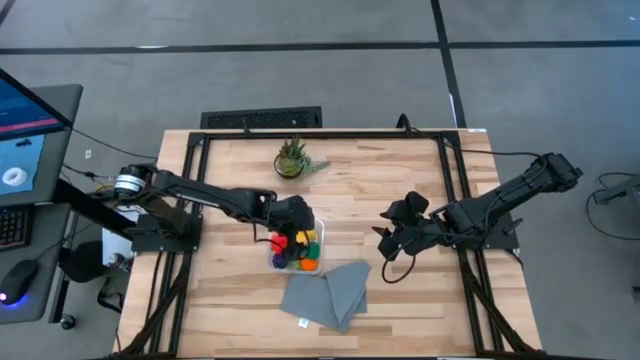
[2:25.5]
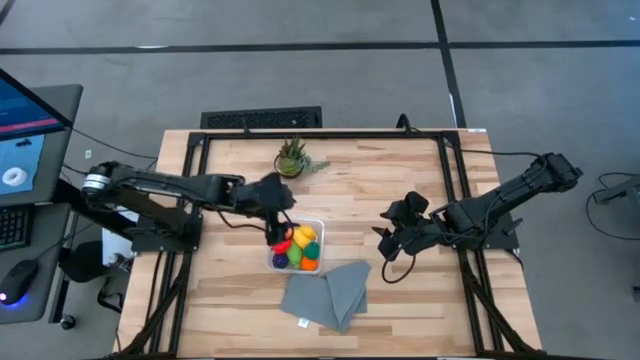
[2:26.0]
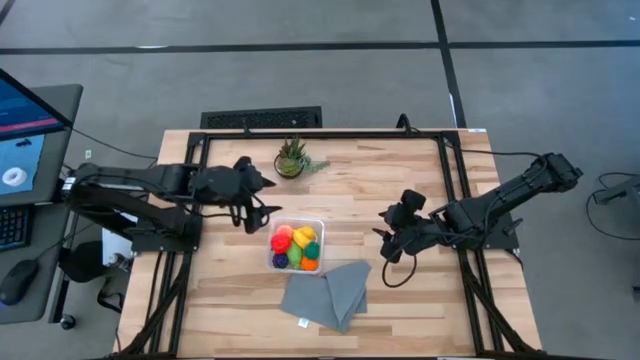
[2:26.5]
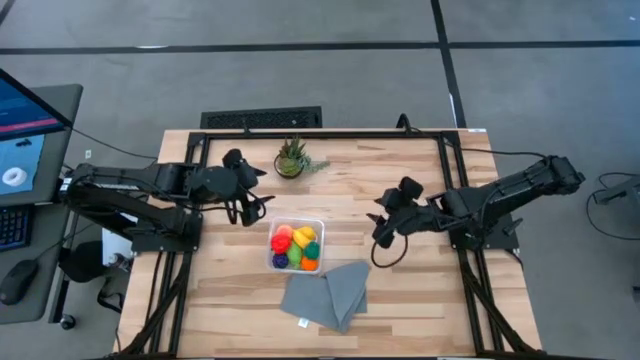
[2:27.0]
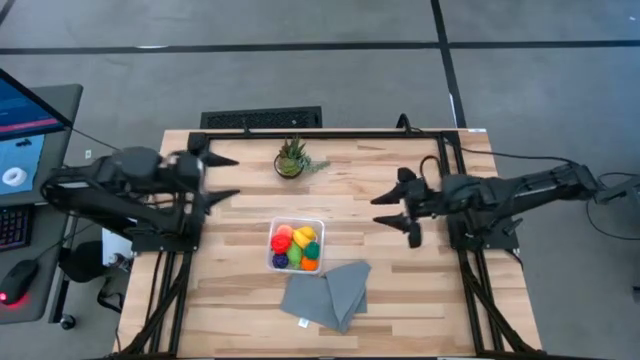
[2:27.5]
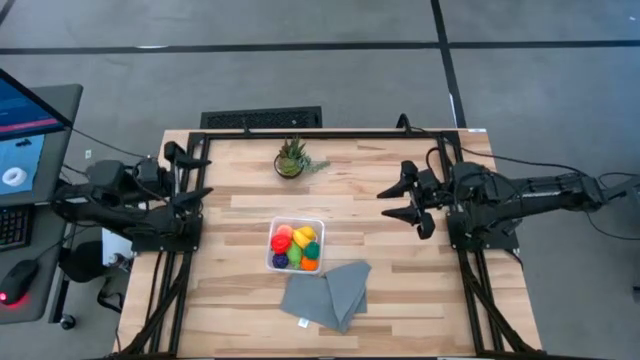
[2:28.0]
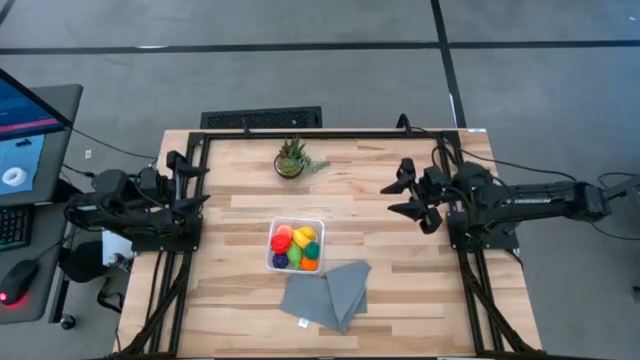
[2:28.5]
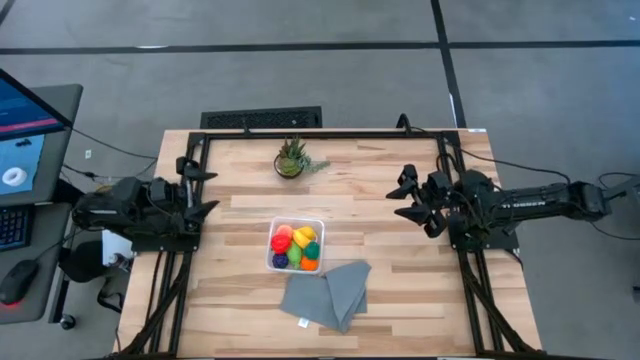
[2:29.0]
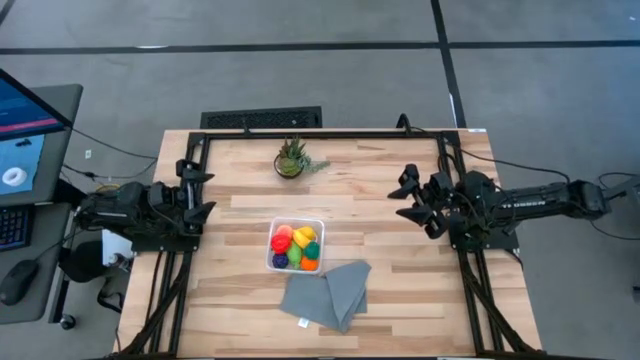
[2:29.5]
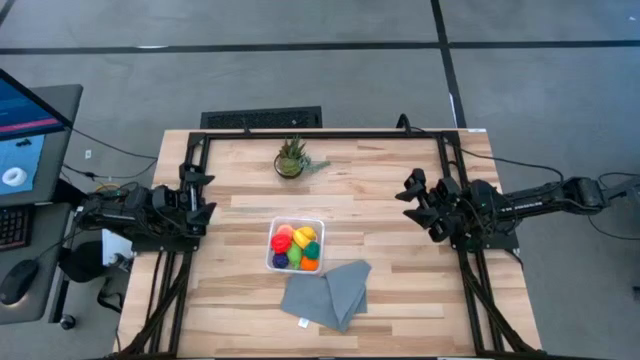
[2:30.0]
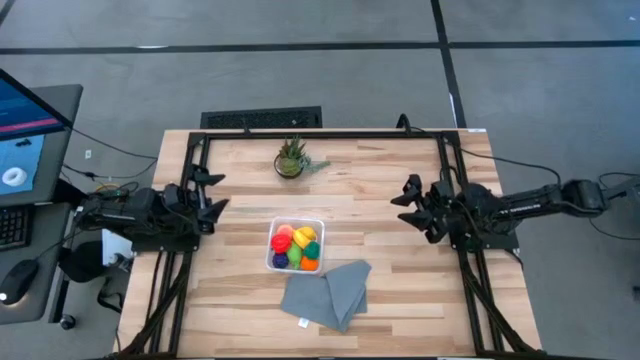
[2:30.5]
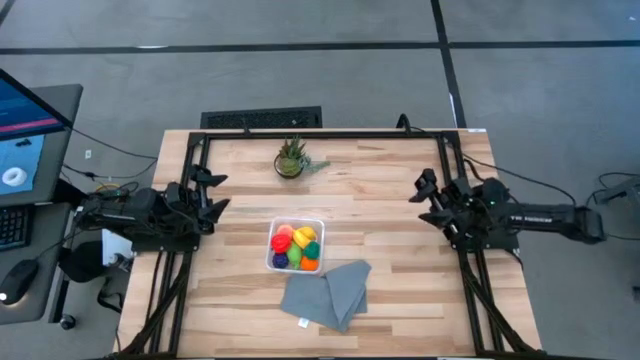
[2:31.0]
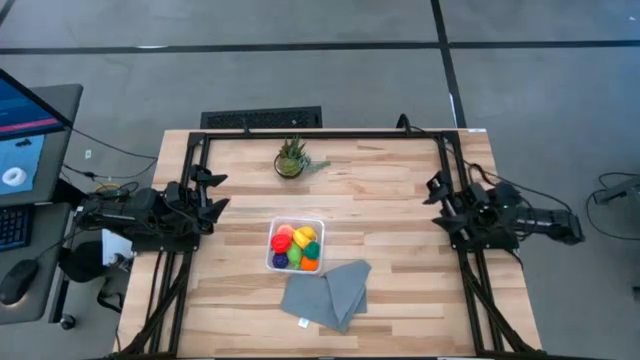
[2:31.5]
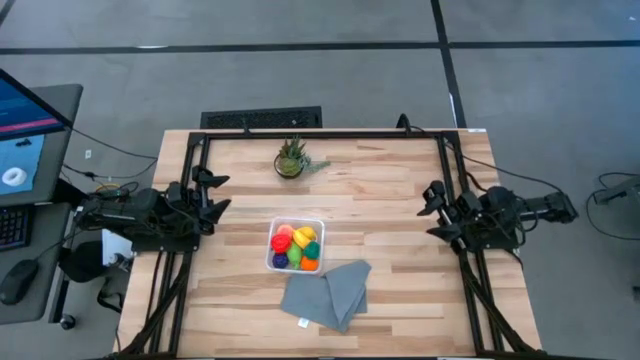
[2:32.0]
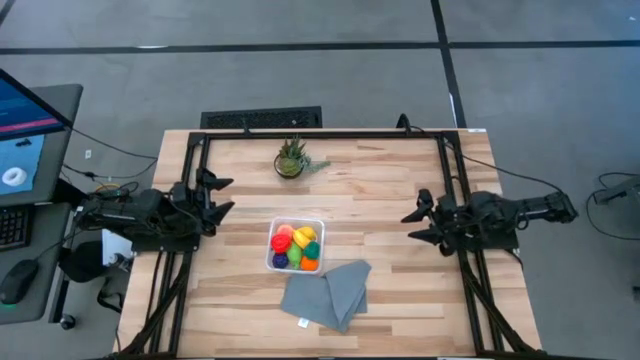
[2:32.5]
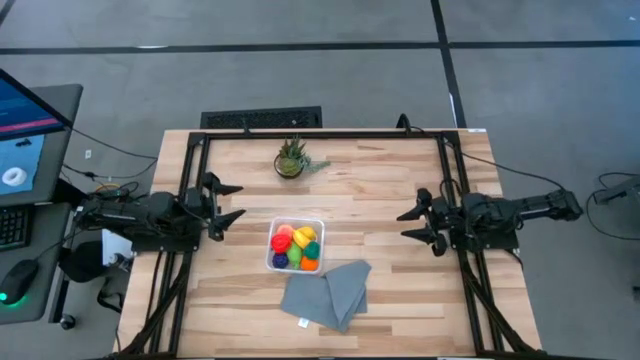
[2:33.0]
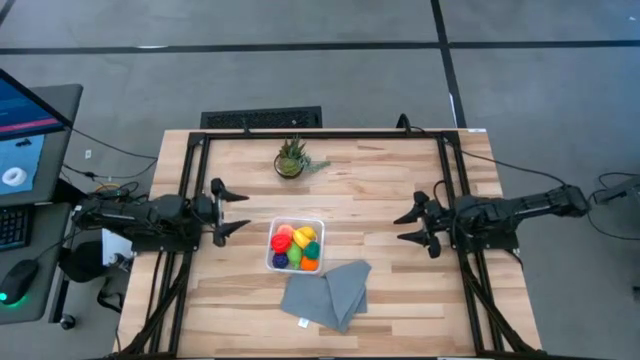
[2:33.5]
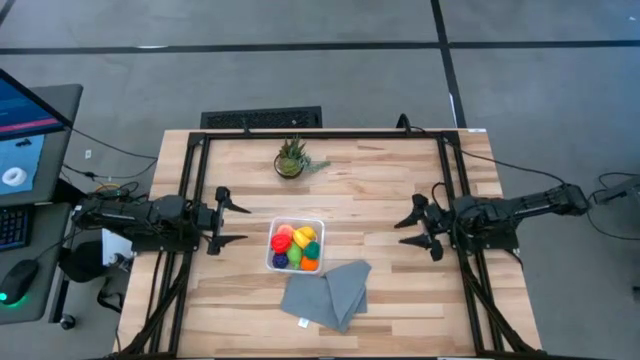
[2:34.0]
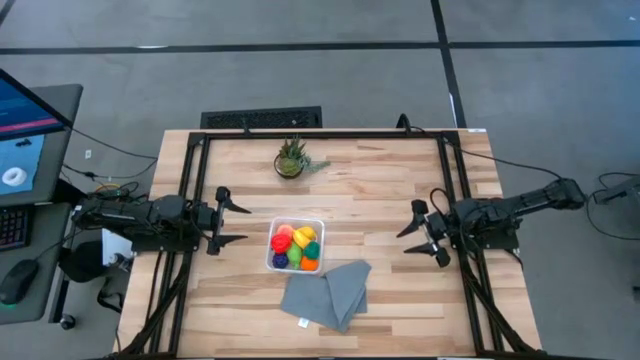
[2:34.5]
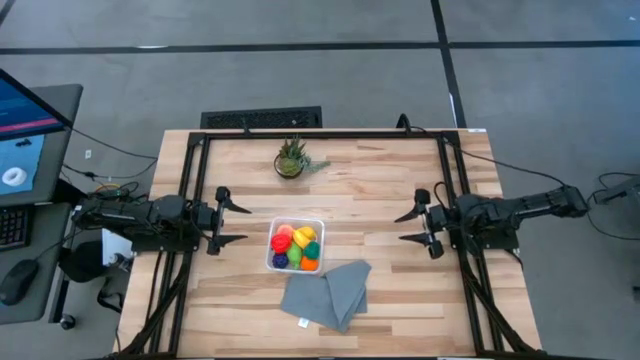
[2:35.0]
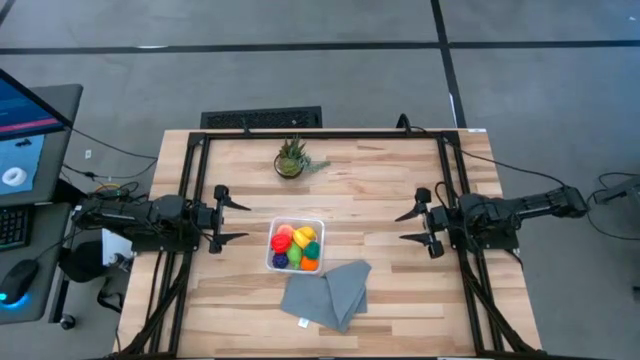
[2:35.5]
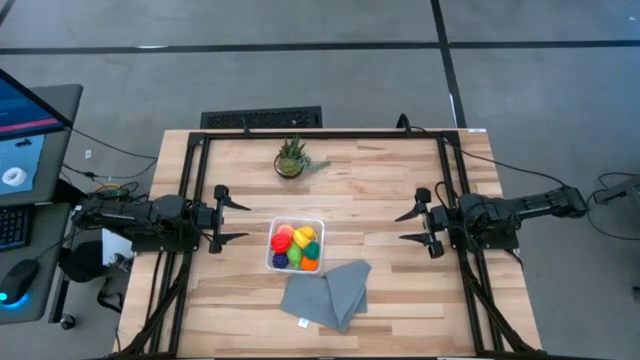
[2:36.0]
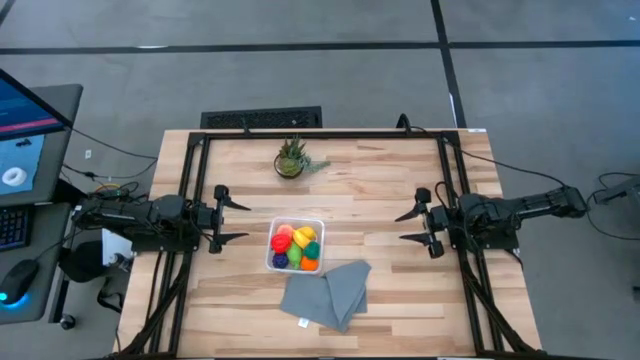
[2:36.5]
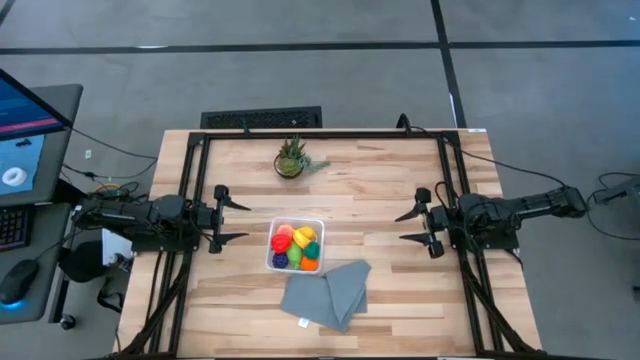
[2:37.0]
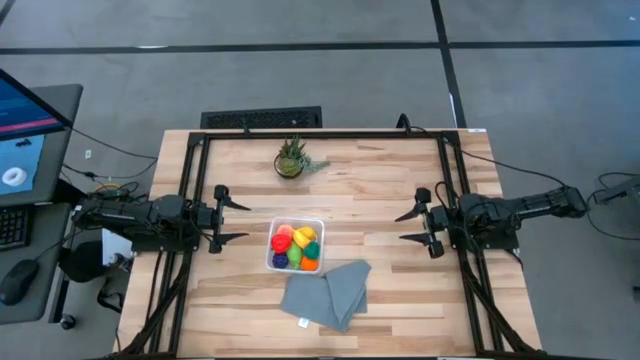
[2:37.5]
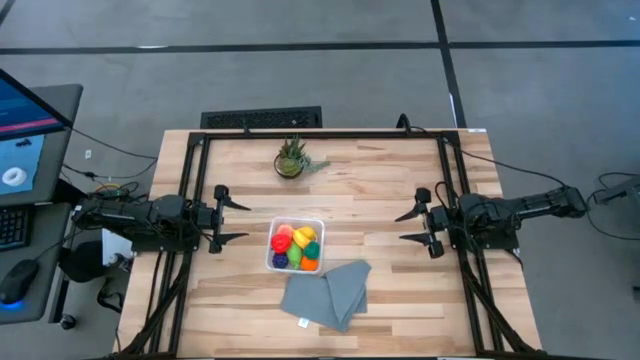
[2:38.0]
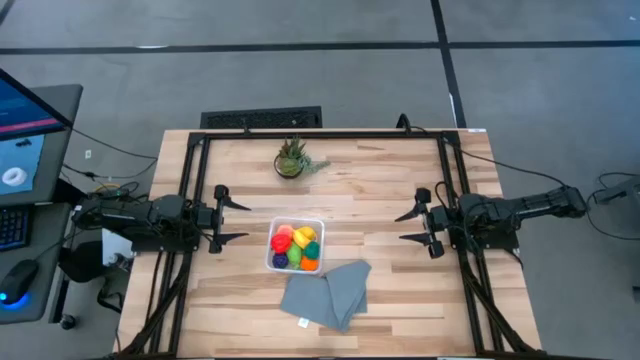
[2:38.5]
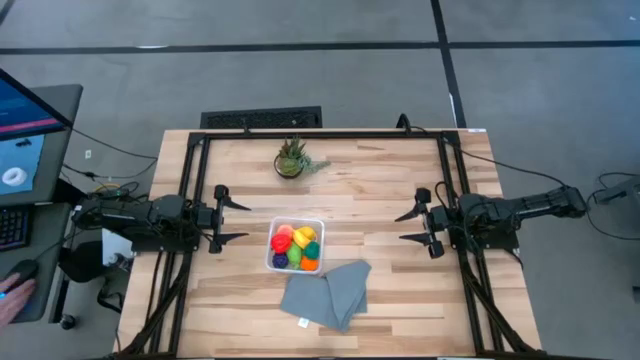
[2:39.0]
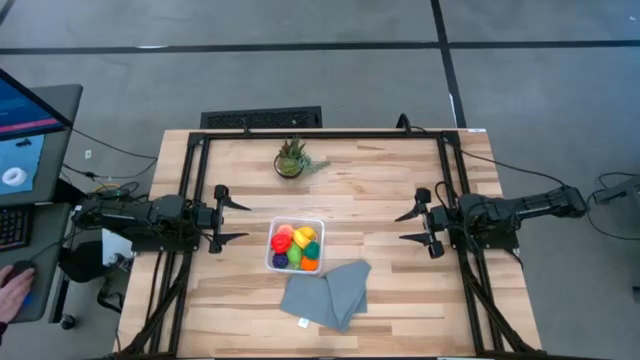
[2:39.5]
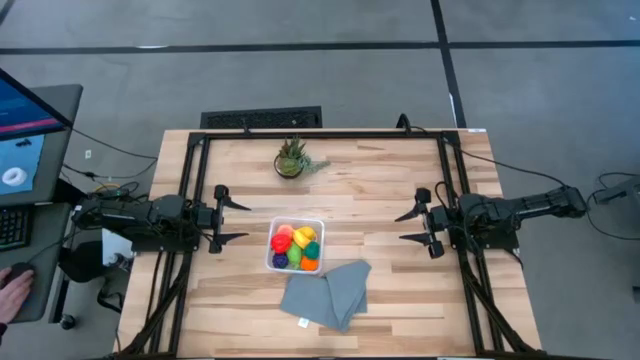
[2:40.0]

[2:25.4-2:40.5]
Task: Pick and placing Produce into tupperware
Return to Home Position

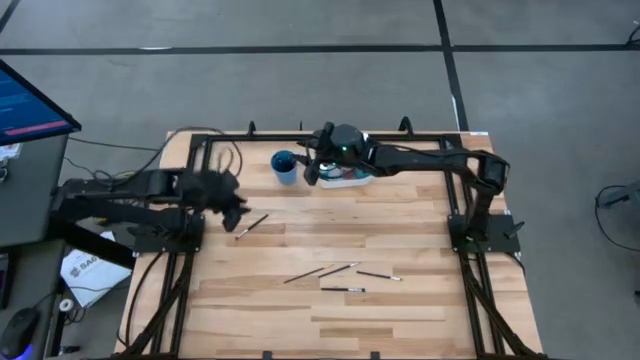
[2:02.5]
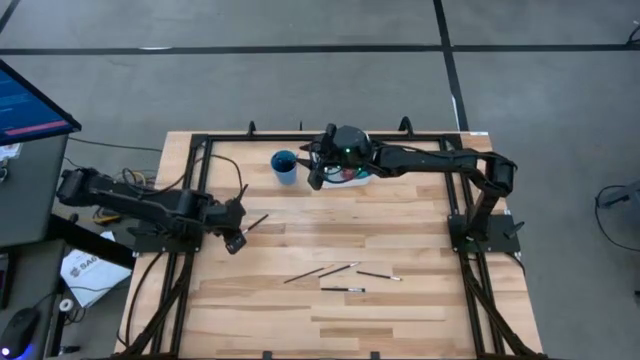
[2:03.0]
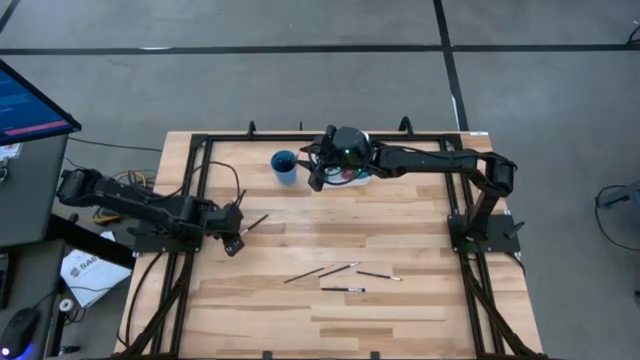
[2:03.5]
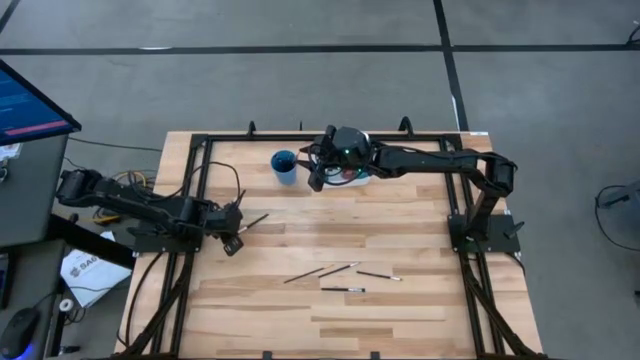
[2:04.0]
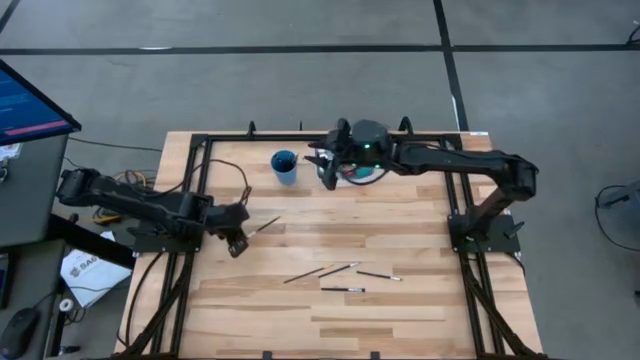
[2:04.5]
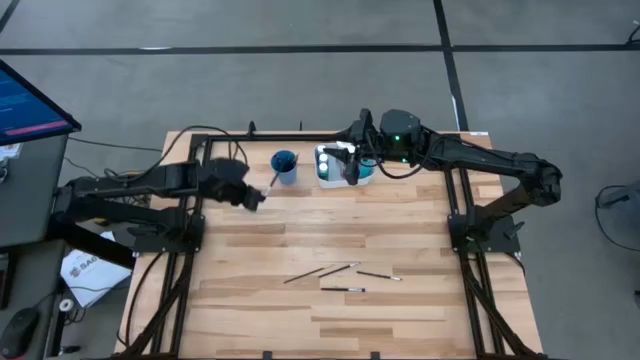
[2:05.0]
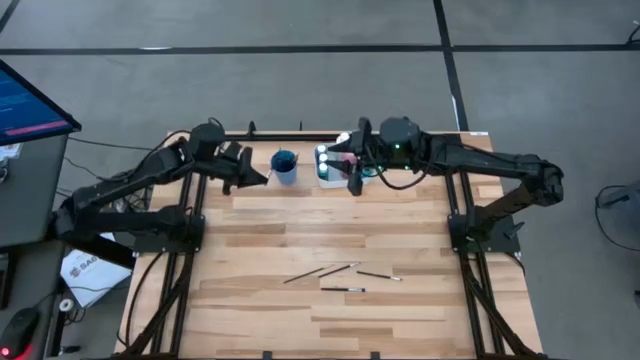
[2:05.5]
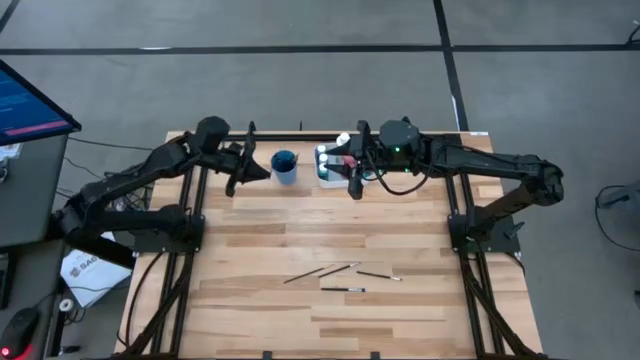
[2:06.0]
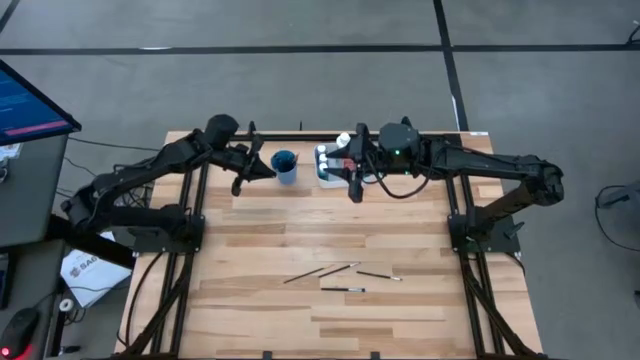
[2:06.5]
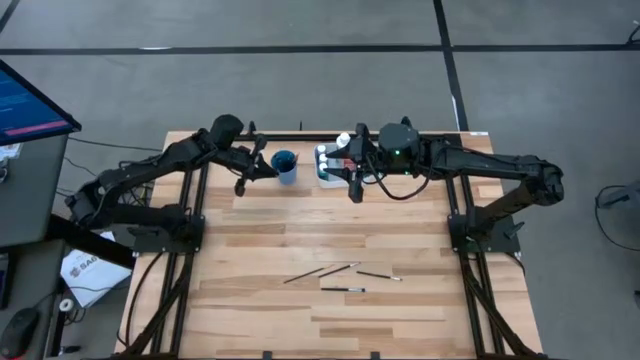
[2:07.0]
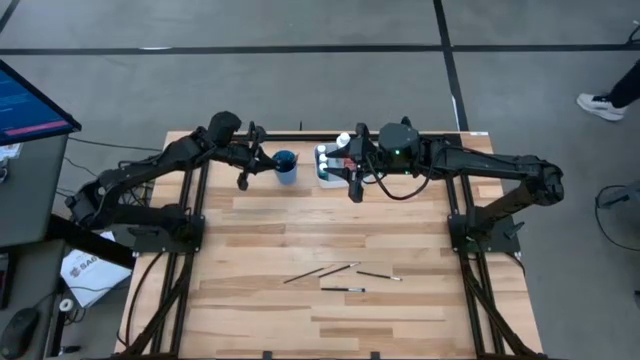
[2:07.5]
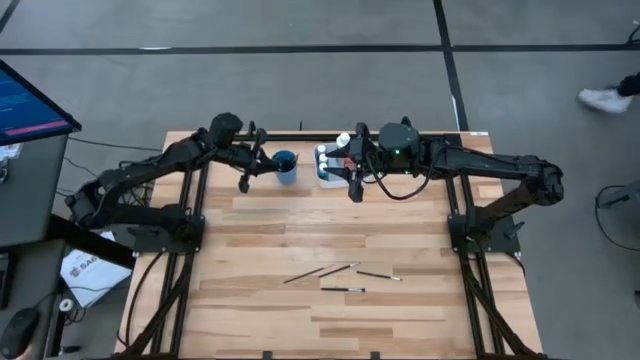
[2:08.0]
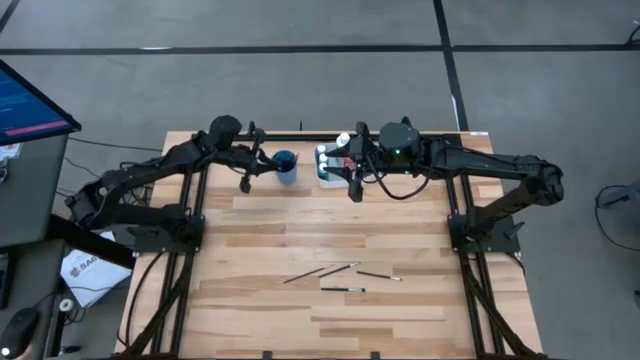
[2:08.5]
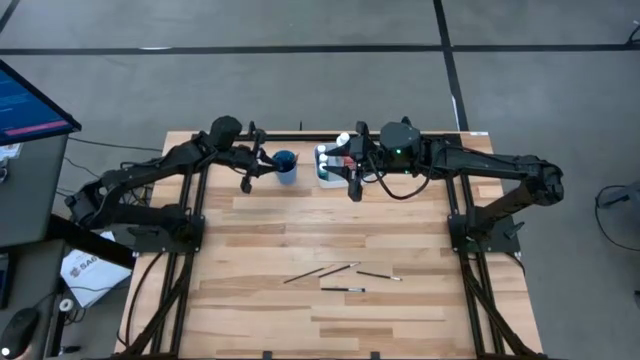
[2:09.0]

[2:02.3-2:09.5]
Task: Pick & Place Paint Supplies
Put the silver and black paint brush into the blue cup
